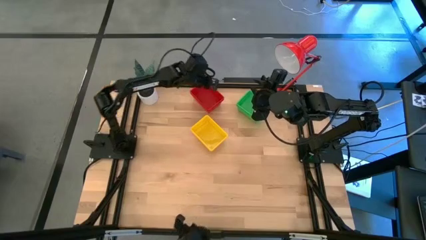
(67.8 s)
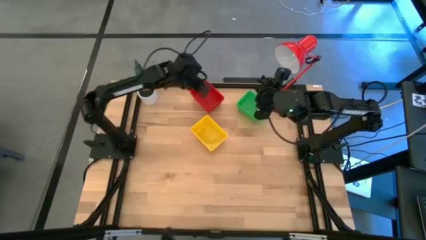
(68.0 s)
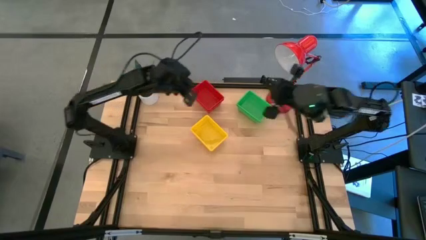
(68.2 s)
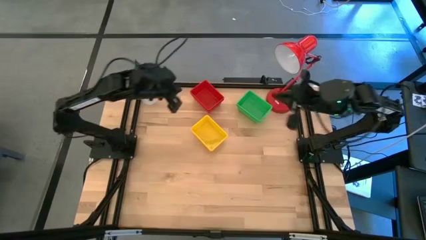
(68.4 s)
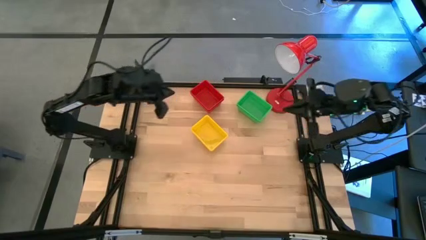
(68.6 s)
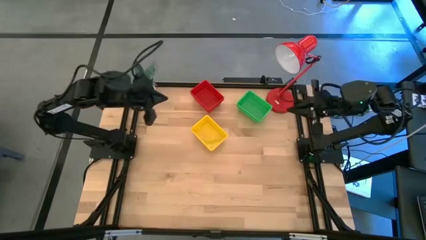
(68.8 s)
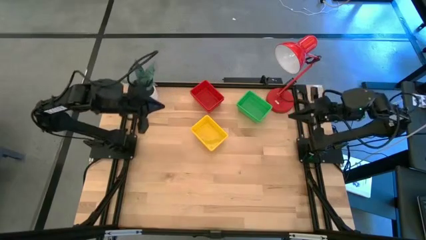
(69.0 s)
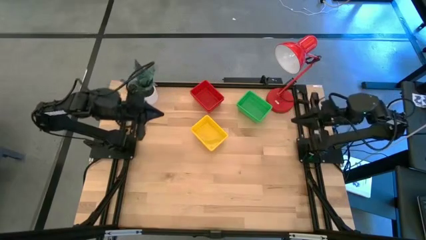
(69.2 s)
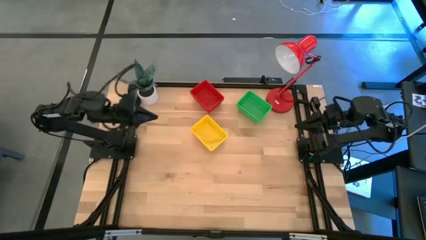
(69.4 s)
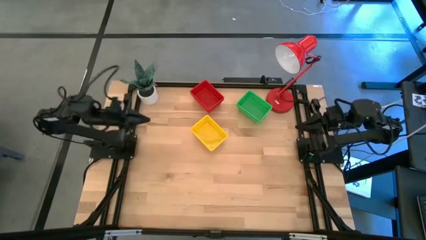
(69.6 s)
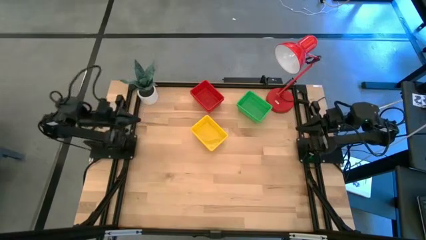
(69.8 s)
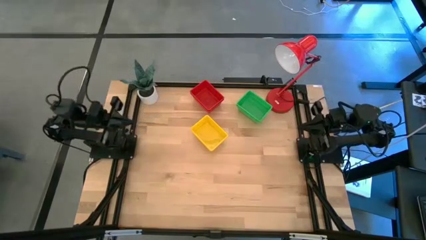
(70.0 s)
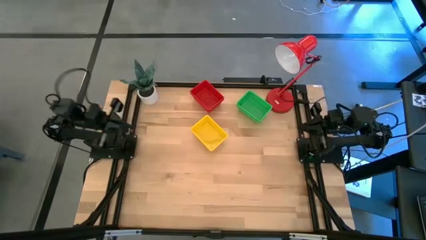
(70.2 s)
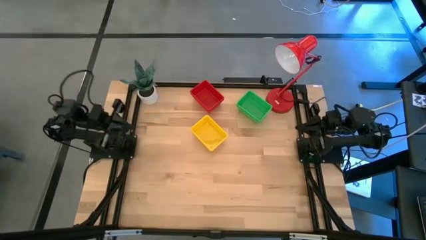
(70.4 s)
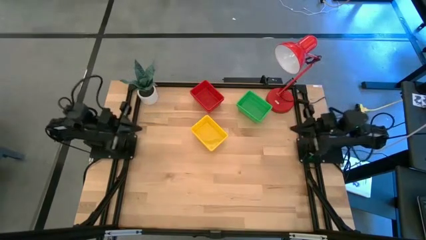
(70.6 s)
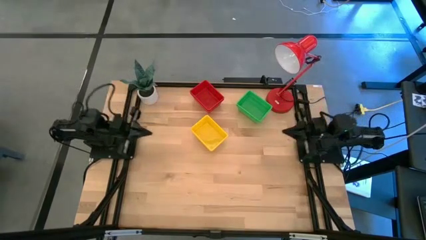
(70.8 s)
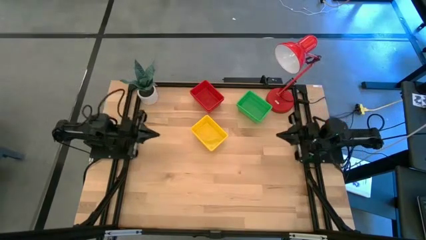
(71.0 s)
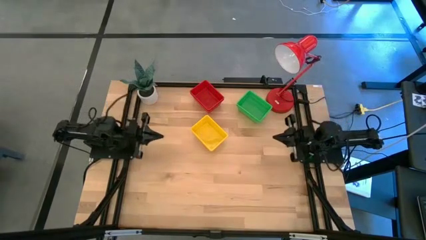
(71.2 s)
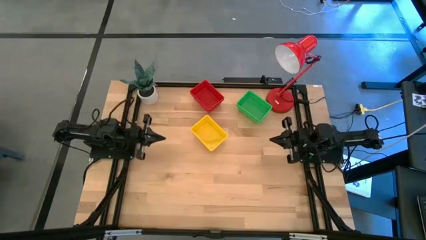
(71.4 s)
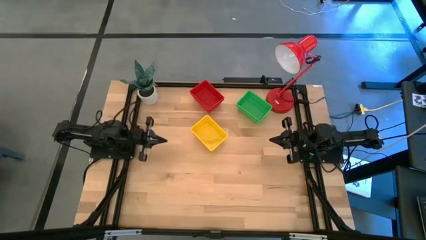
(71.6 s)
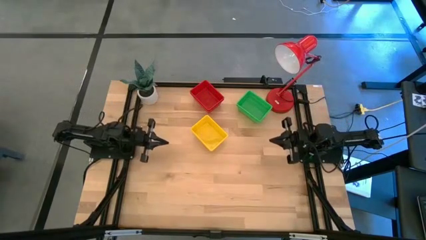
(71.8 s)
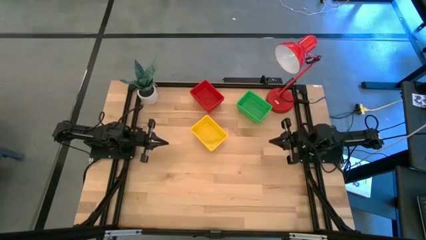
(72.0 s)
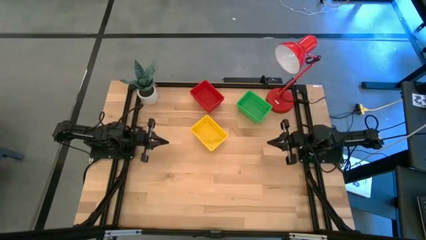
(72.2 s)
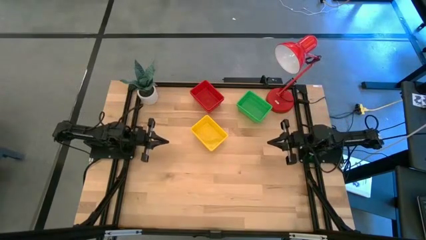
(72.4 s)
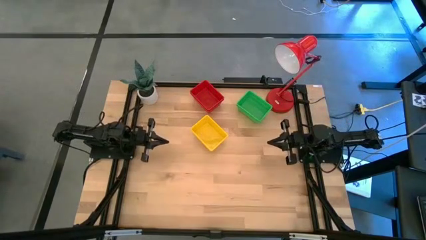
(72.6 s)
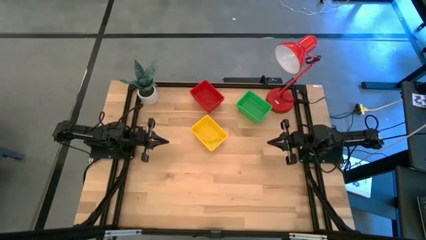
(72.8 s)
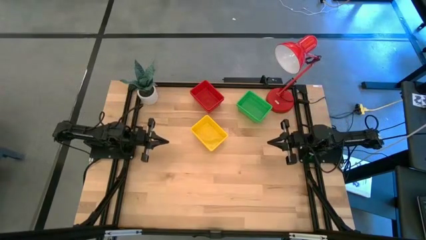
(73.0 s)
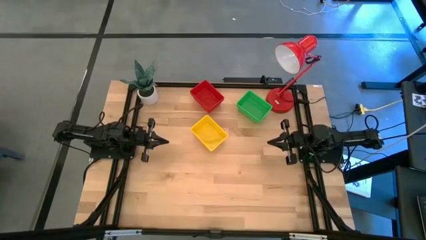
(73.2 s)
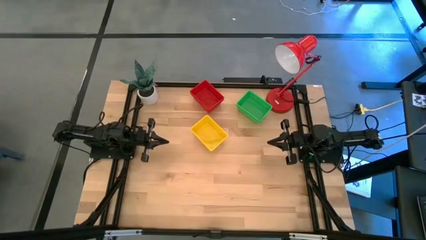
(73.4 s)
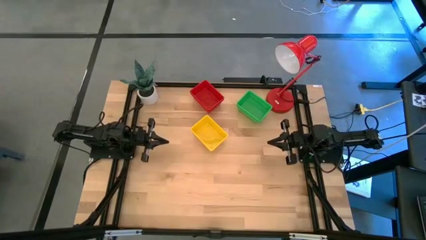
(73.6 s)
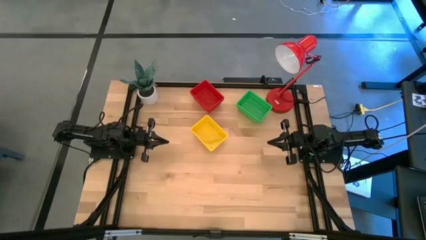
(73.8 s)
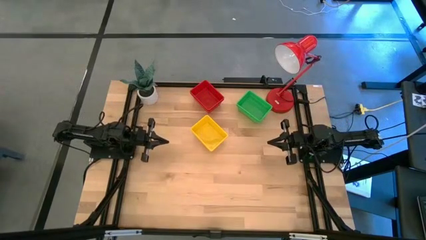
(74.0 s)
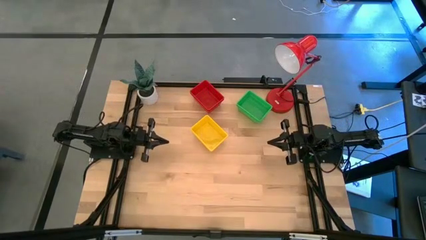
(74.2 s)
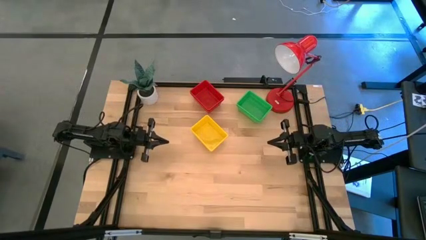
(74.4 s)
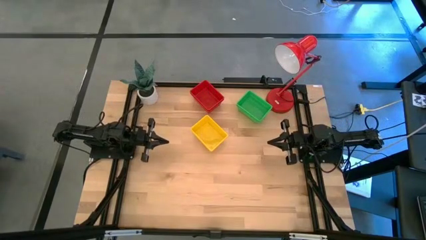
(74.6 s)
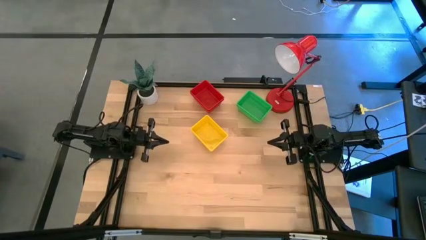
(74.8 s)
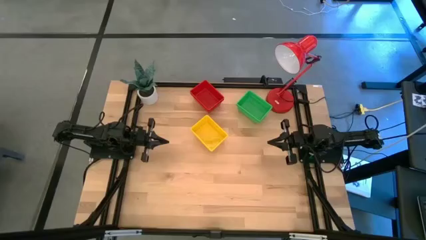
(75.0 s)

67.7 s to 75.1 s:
Return to Home Position

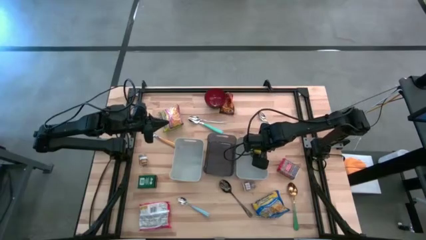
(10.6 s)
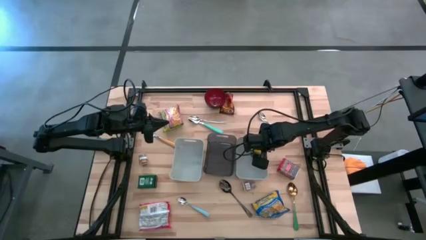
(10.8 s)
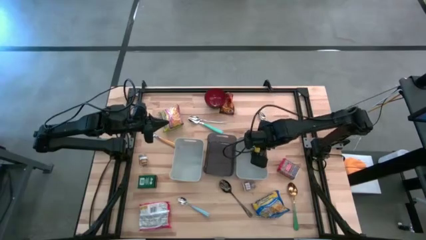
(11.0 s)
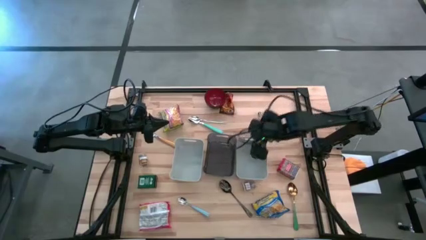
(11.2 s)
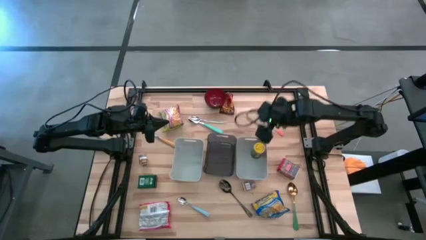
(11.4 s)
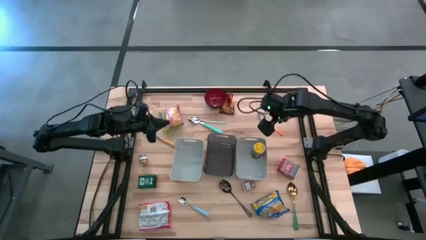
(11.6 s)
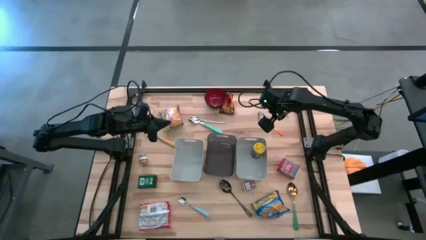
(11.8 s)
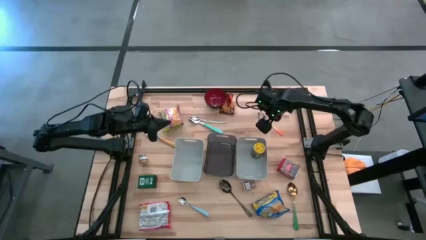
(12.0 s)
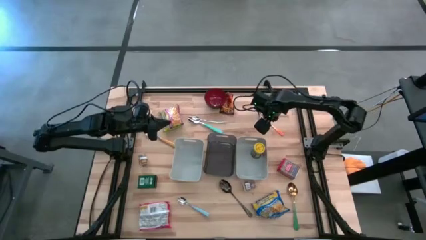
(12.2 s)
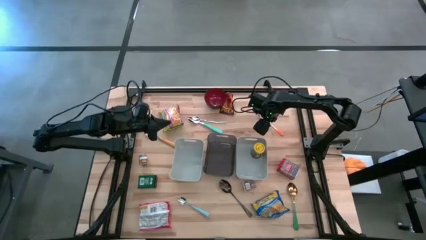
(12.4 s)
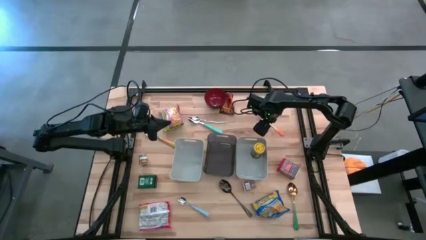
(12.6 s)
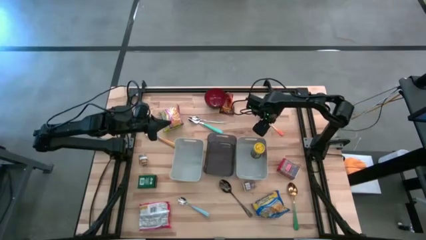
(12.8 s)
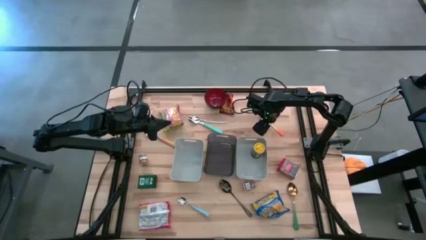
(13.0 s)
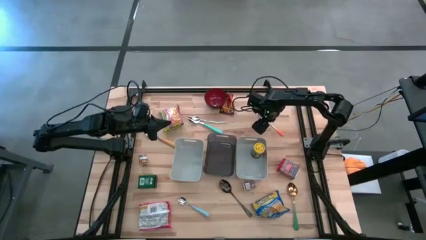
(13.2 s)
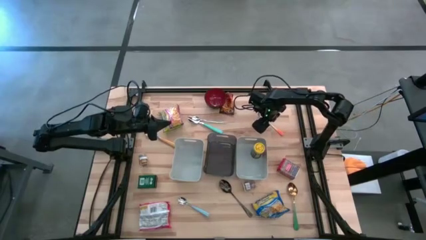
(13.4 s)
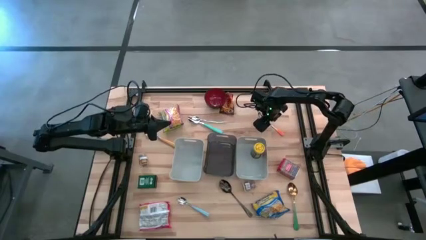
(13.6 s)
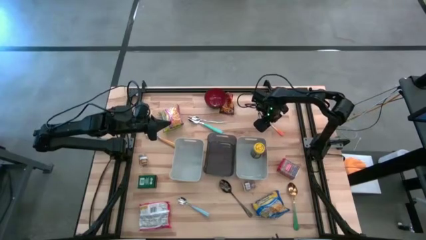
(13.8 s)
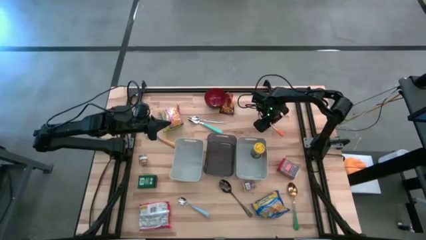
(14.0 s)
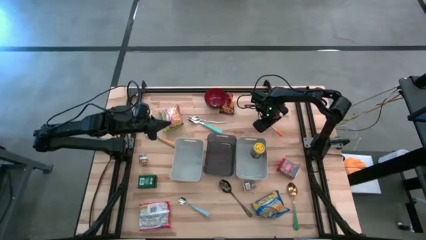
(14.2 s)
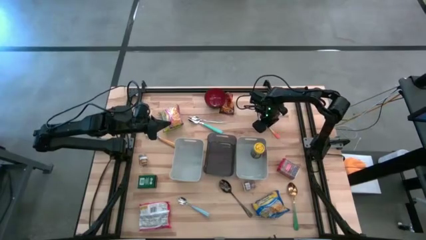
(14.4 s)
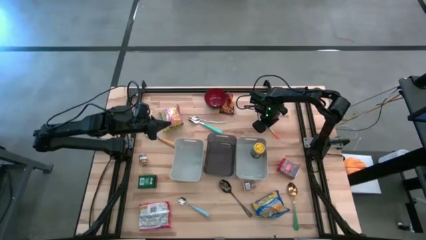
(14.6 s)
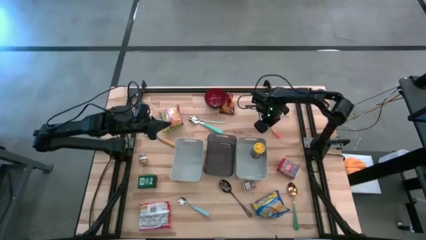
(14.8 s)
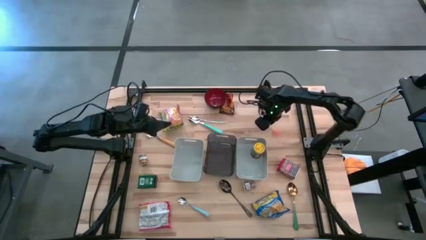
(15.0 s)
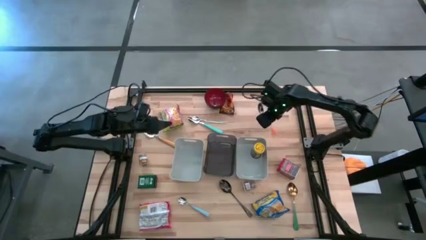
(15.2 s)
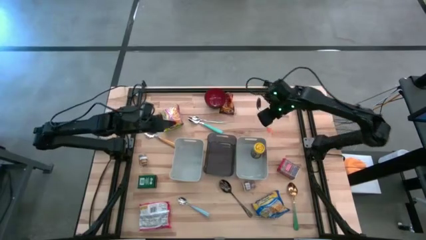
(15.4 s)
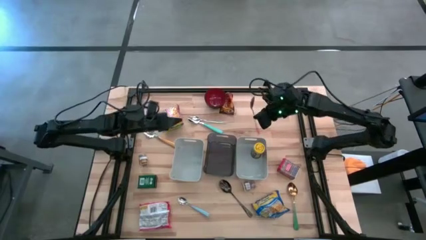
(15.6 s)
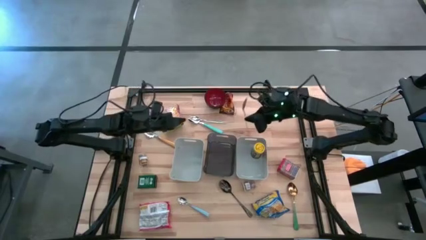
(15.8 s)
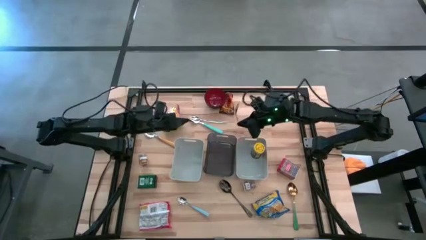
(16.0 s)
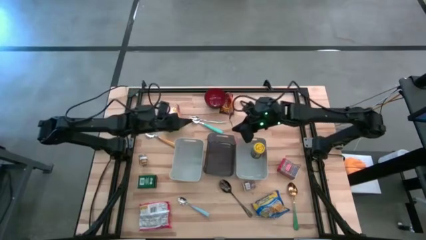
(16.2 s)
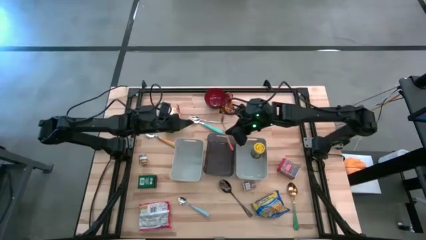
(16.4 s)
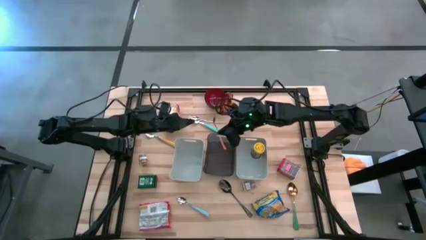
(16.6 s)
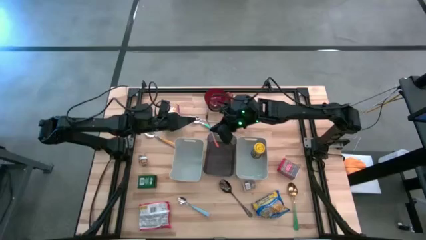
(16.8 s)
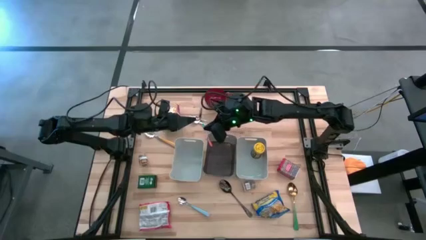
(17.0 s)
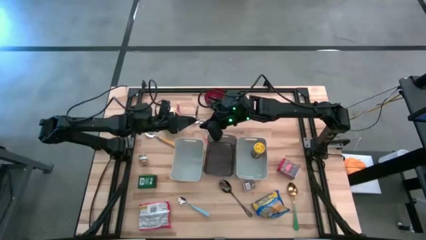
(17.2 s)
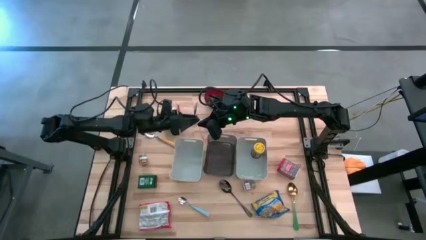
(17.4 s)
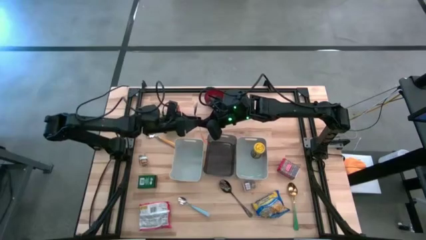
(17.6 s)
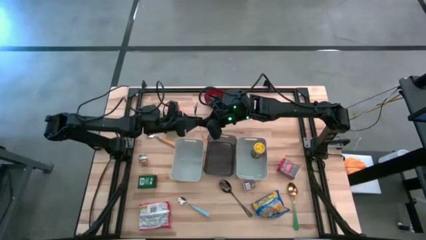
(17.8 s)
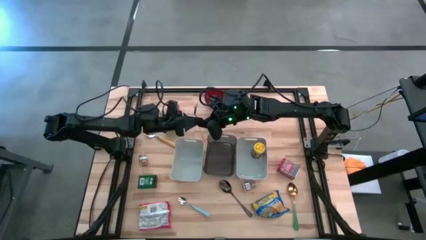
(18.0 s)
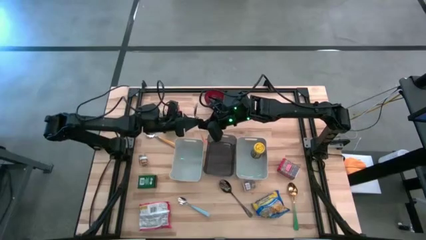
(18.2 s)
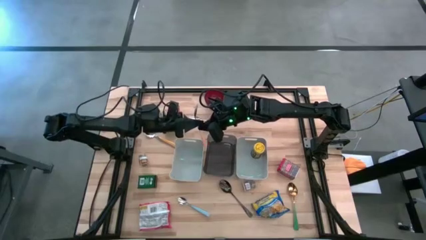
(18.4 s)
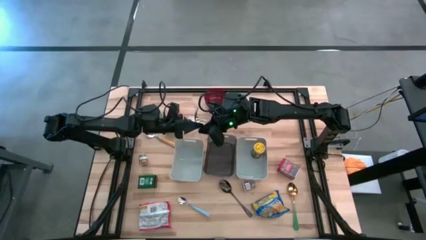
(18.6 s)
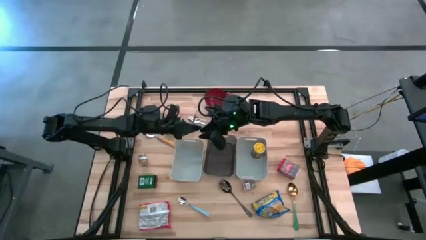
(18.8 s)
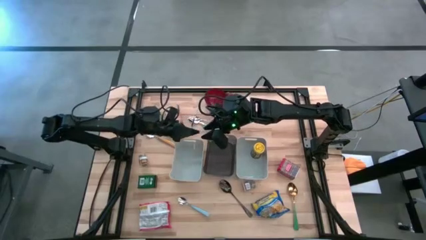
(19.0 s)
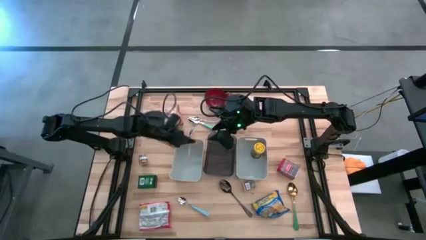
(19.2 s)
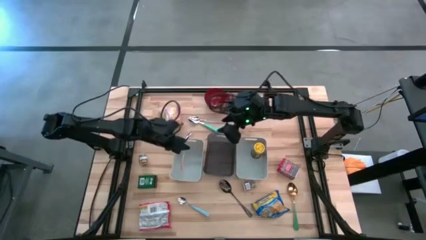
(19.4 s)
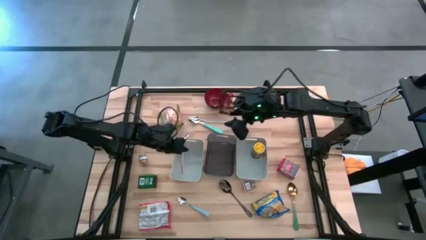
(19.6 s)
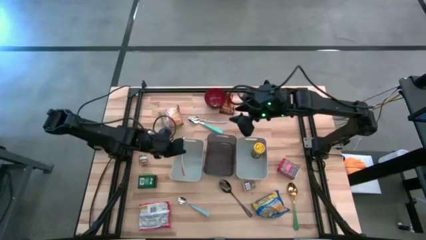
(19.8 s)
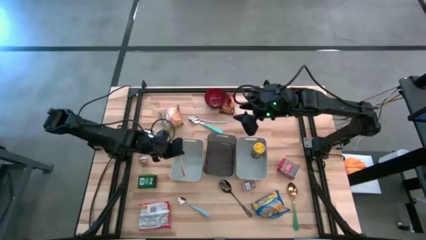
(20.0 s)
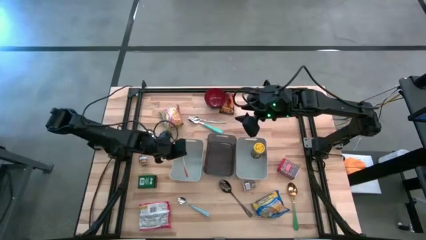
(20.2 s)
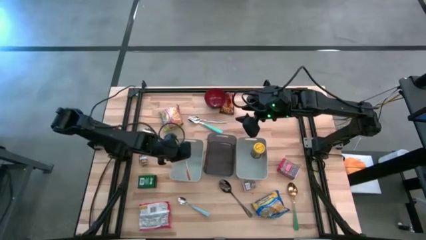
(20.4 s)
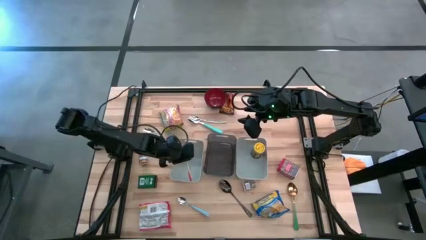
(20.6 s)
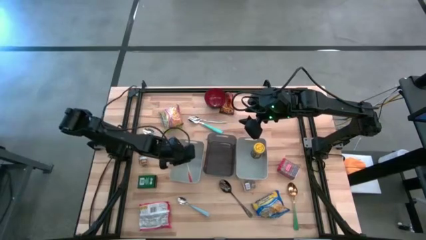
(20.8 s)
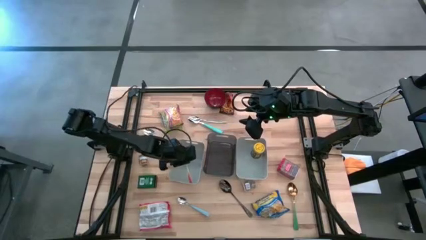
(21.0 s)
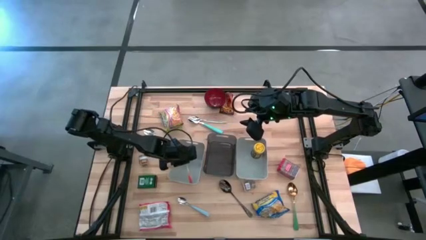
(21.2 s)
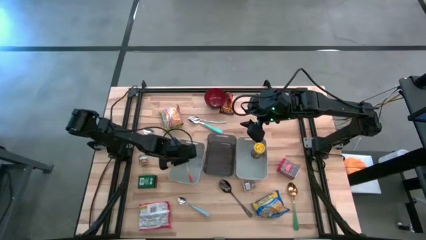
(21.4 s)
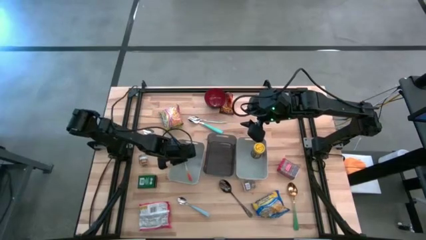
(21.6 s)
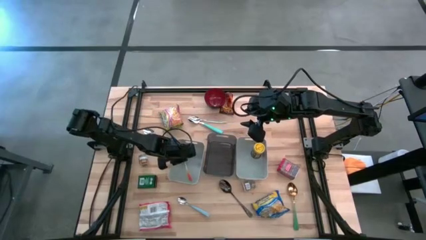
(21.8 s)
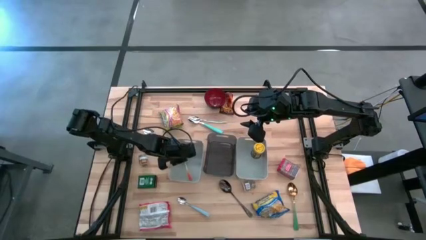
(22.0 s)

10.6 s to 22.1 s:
Put the orange spoon into the left gray bin
